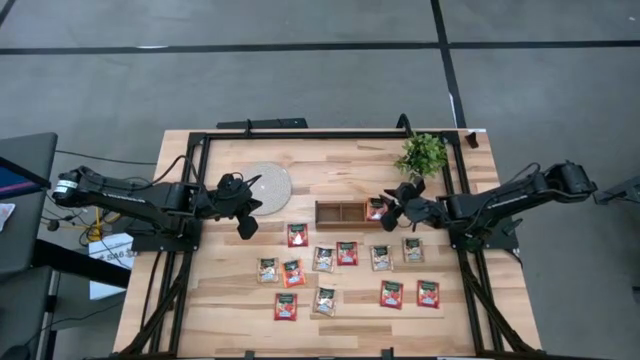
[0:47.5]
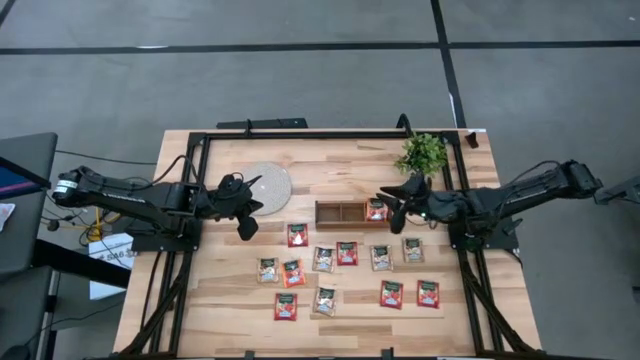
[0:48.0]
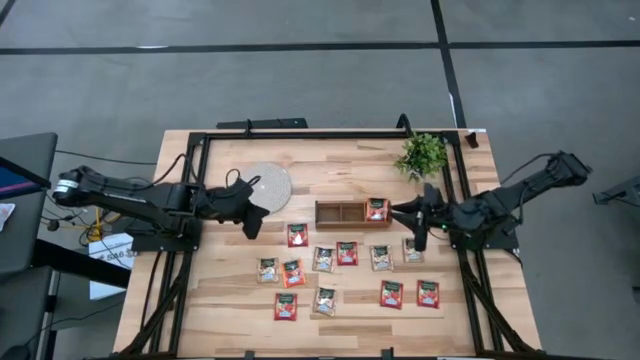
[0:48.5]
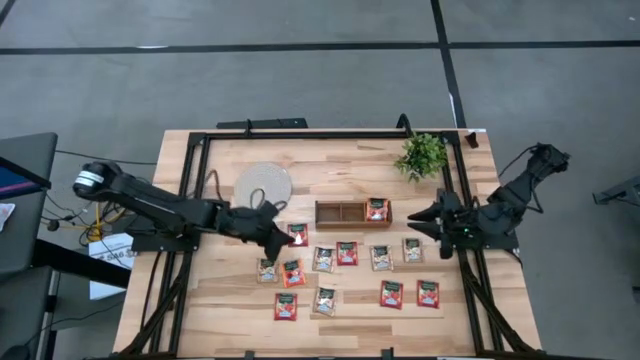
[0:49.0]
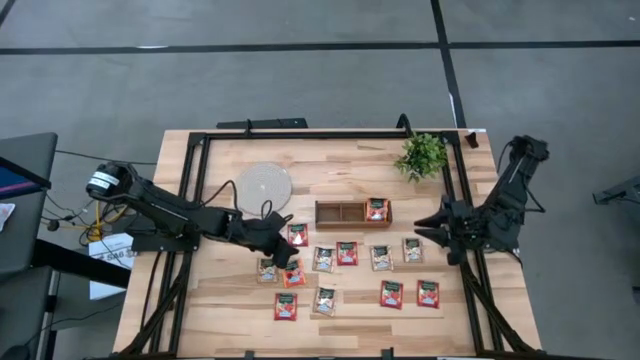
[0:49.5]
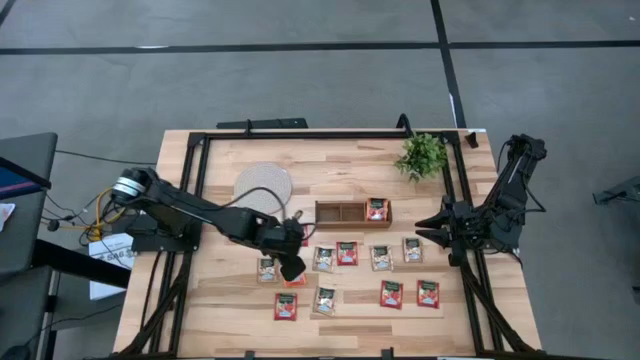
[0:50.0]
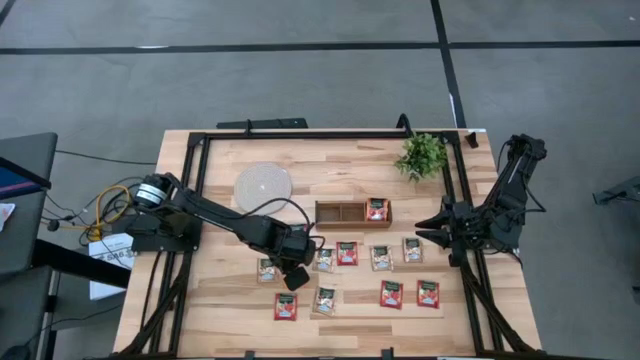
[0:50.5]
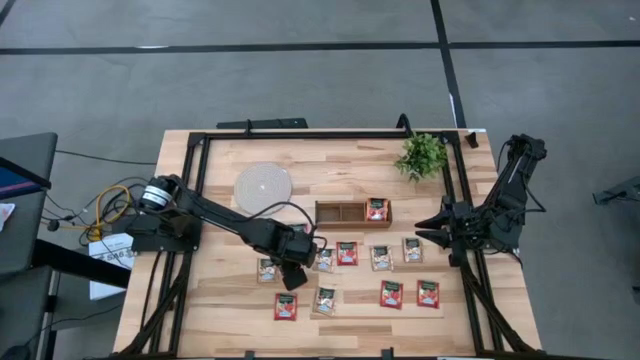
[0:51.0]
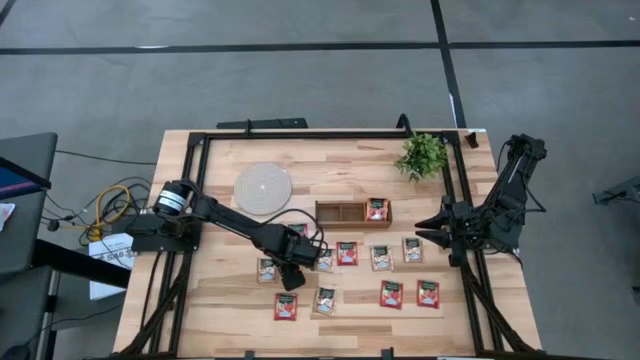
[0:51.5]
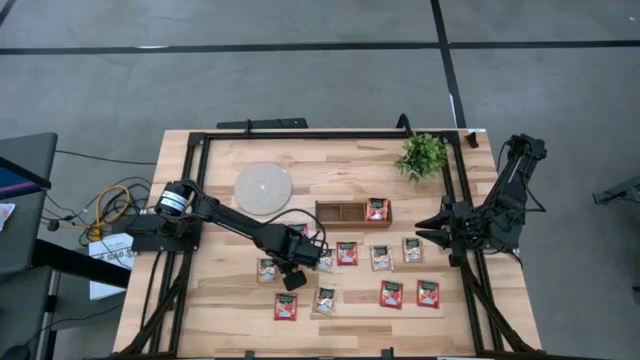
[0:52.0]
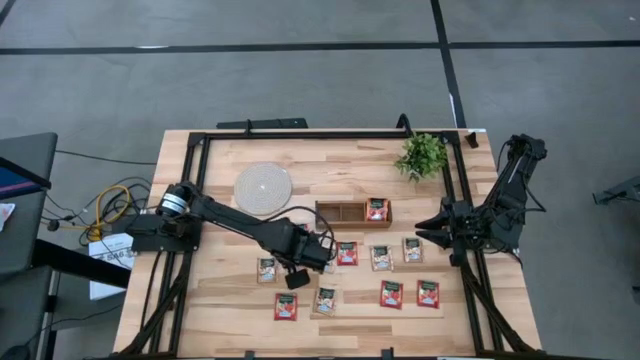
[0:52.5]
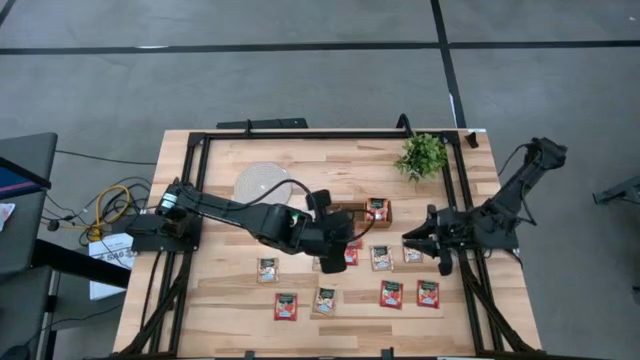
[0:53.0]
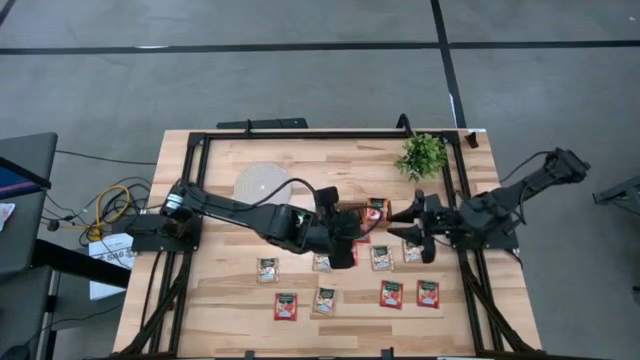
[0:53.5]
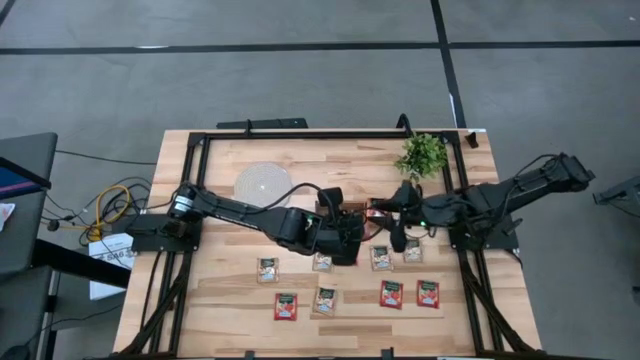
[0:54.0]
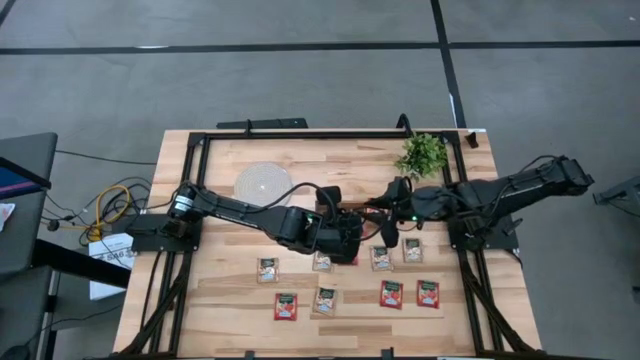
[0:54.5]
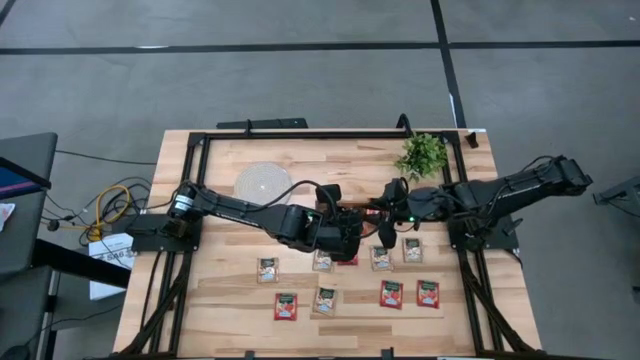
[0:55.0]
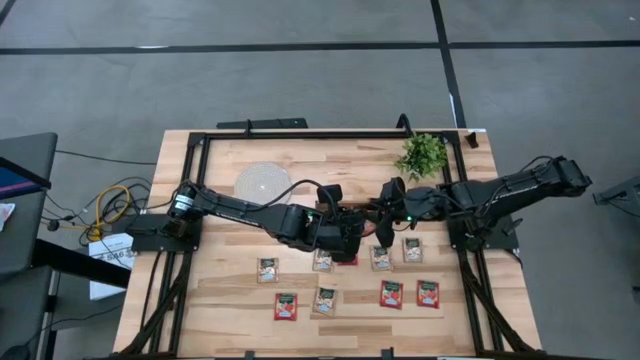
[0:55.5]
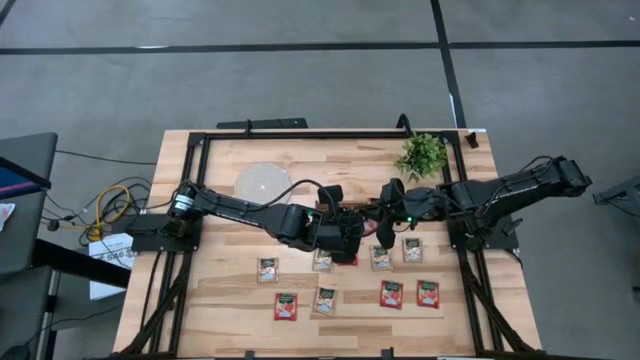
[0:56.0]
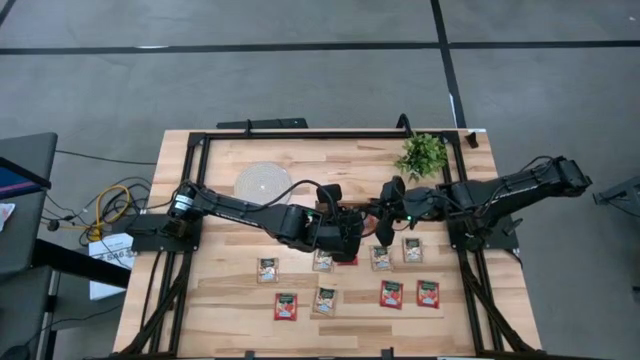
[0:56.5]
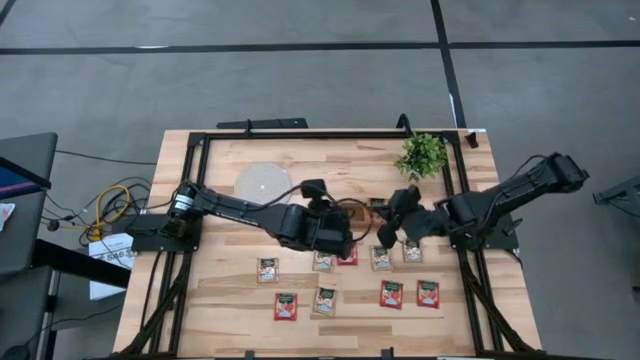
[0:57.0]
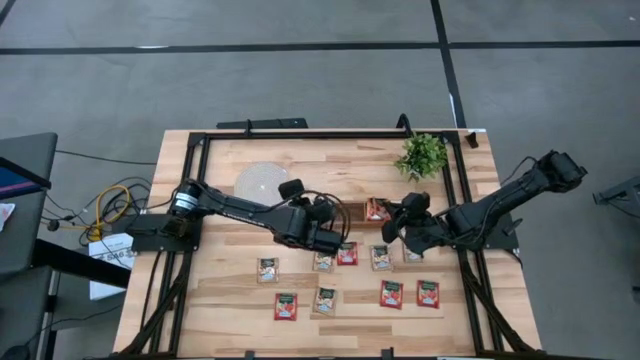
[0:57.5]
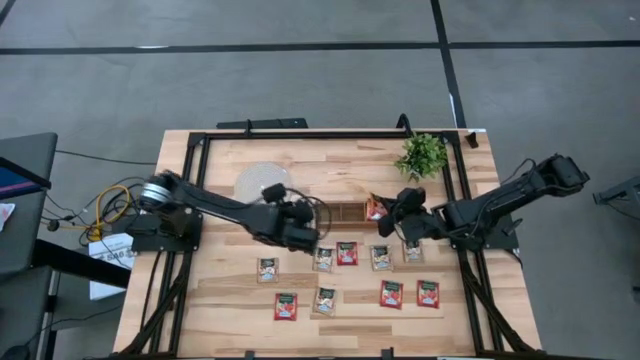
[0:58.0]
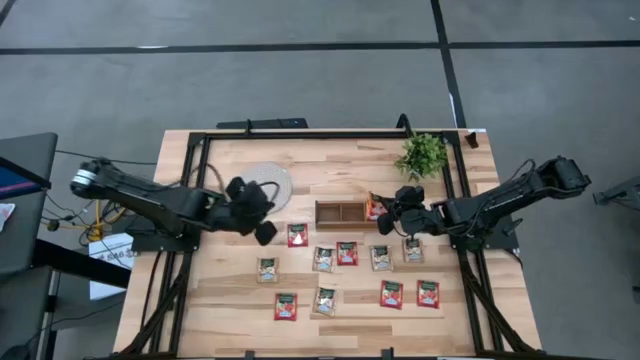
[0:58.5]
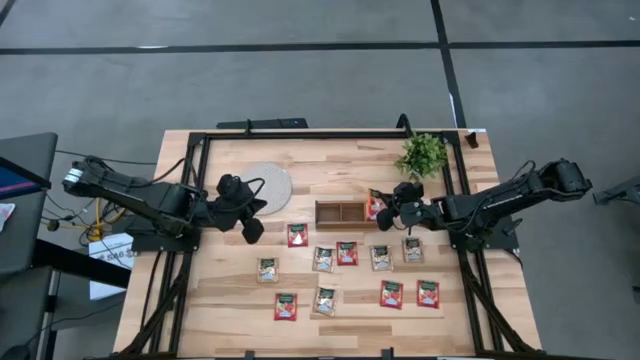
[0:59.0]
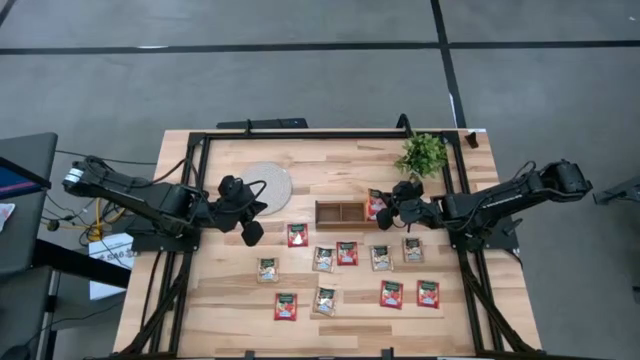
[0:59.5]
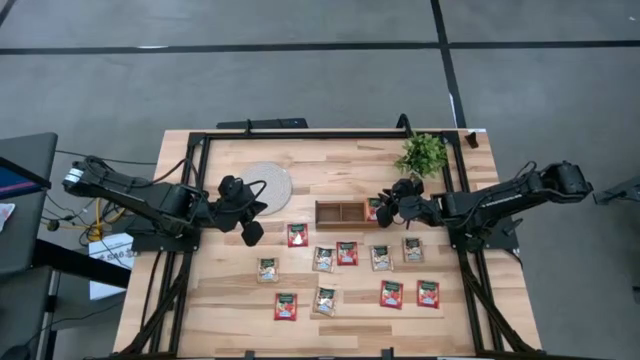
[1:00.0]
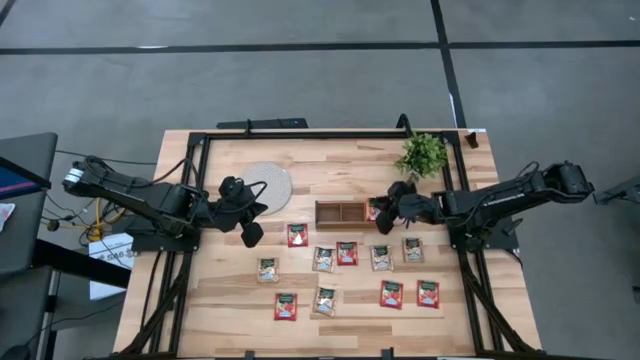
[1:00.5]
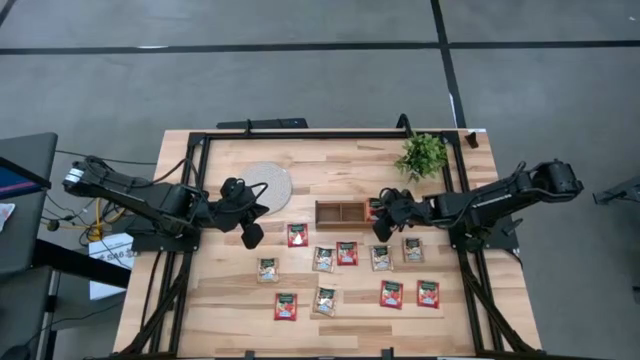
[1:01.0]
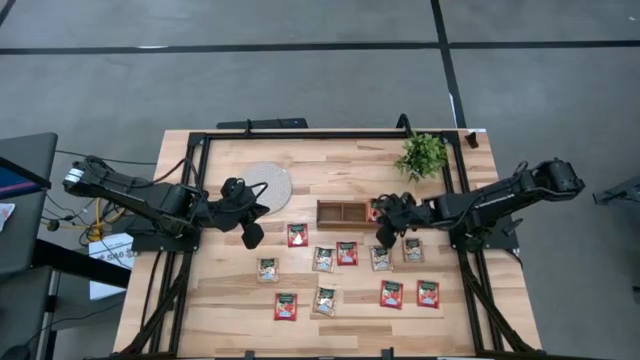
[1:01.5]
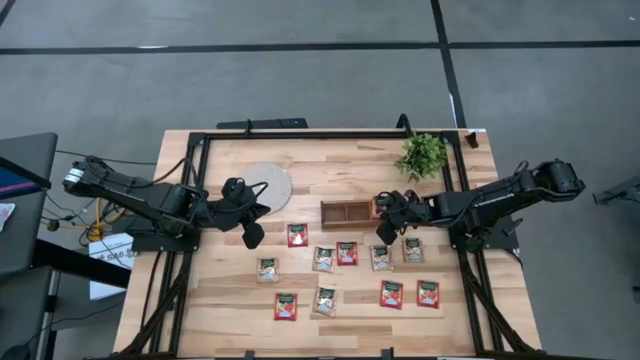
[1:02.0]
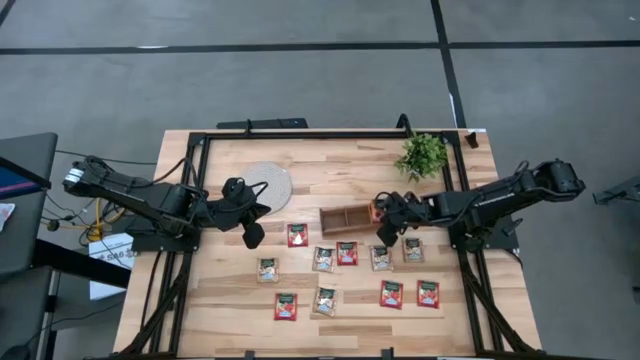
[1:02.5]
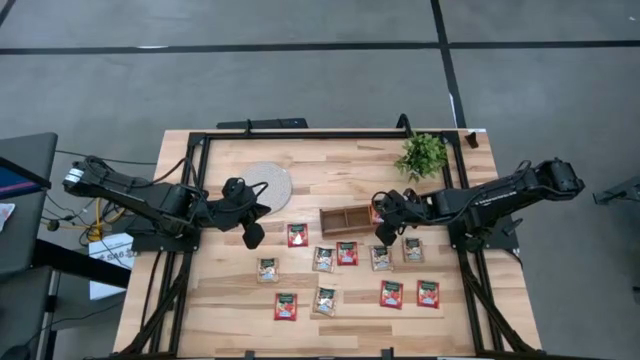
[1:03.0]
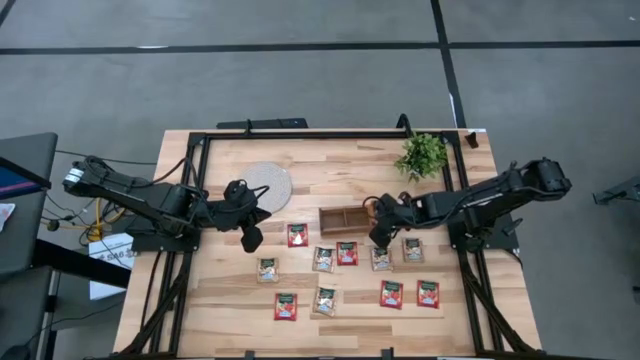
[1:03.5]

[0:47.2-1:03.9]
Task: Pick & Place Tea
Put the orange tea bag into the right section of the wooden organizer

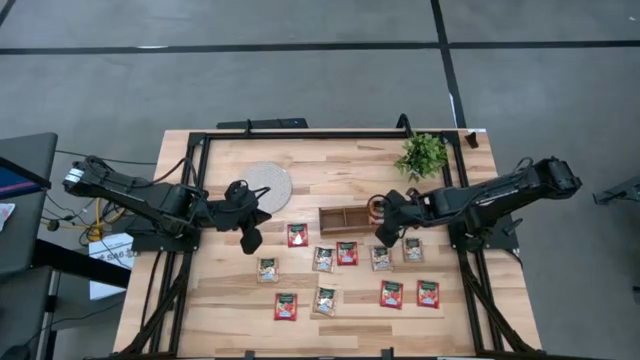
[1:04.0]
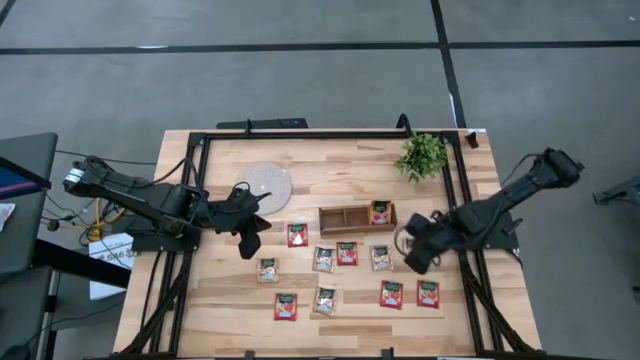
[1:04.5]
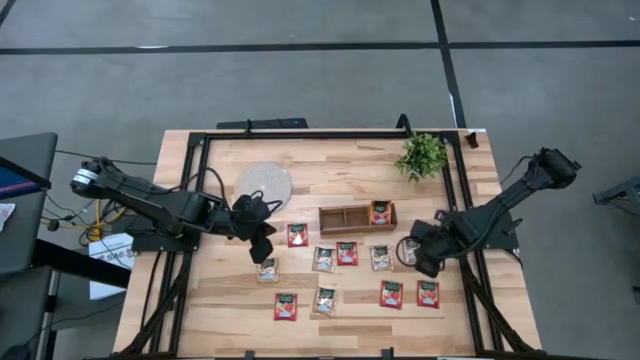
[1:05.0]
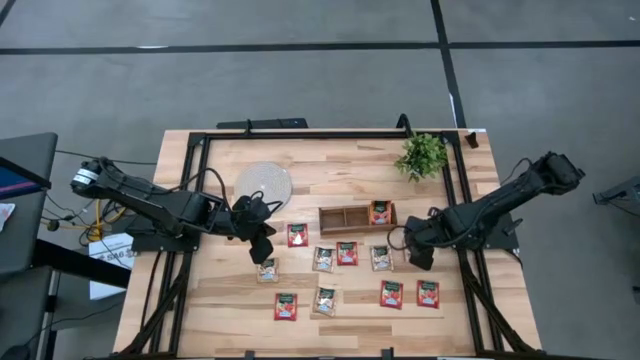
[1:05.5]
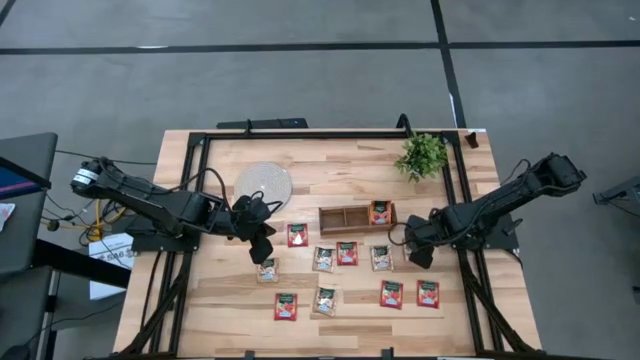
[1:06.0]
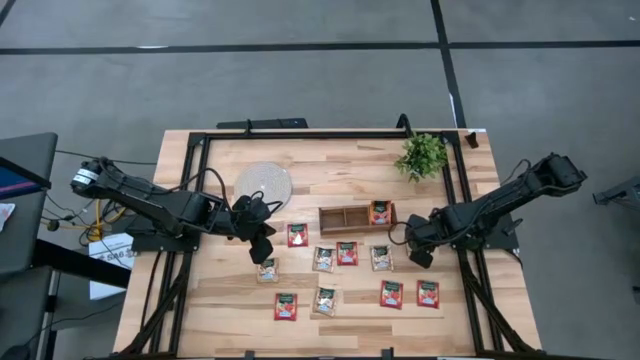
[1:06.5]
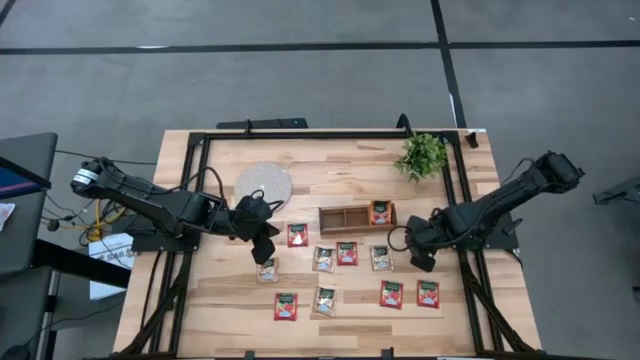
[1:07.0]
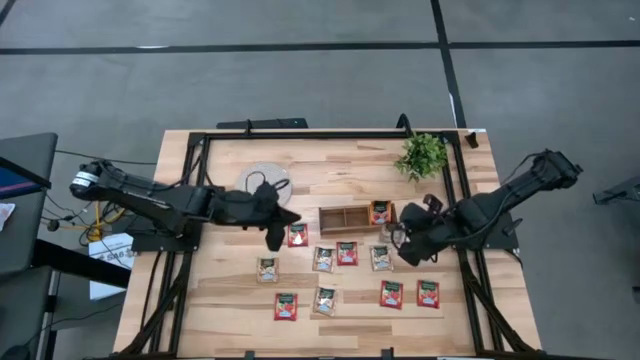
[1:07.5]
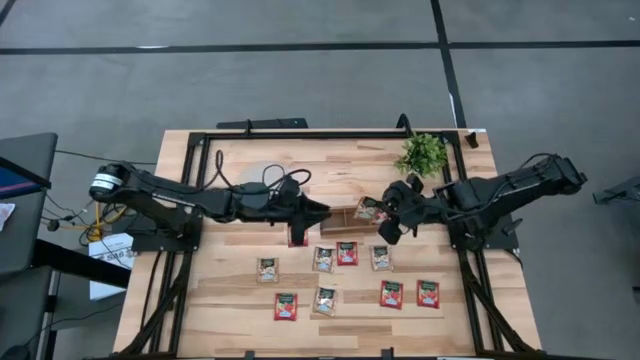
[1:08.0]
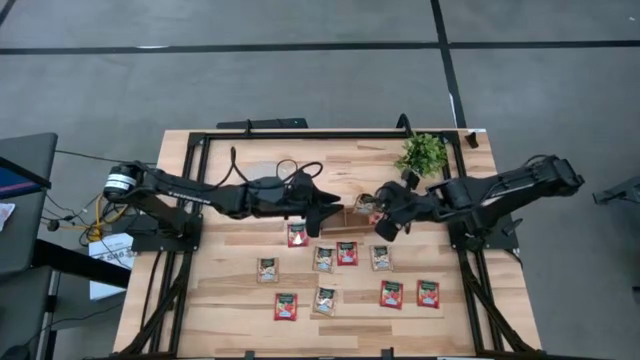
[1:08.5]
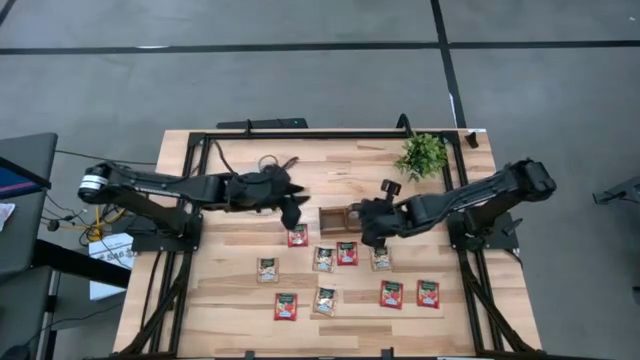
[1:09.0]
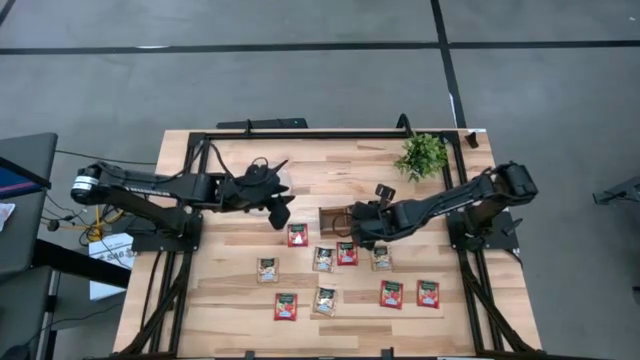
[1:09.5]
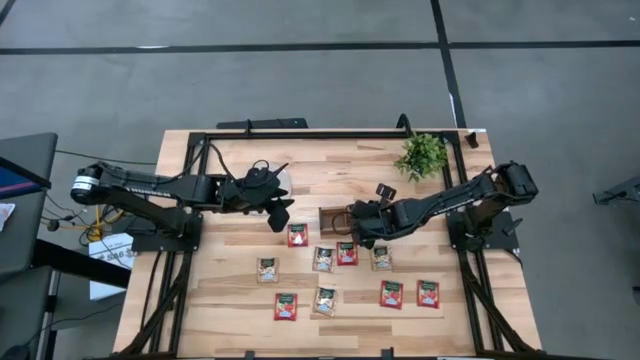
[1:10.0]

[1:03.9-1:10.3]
Put the brown tea bag into the middle section of the wooden organizer
